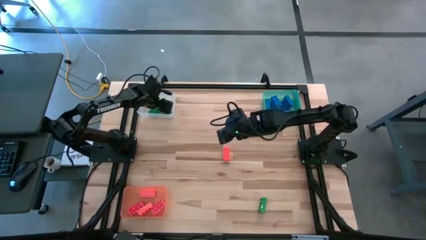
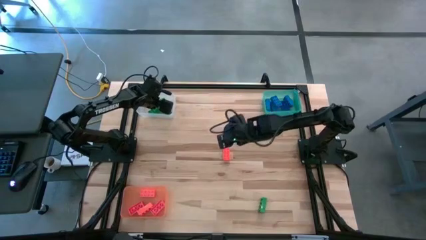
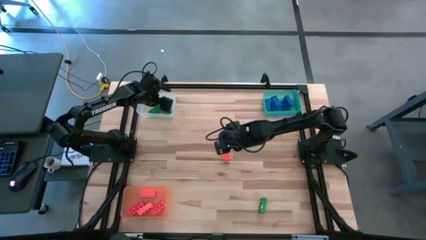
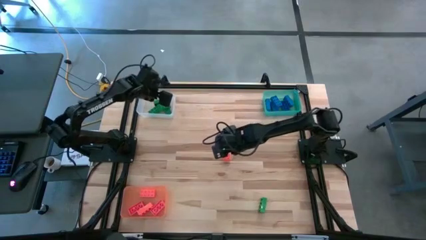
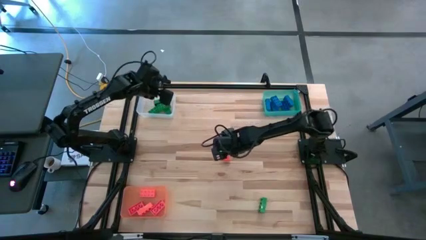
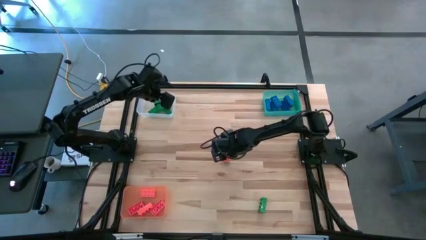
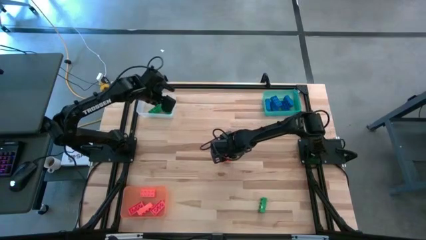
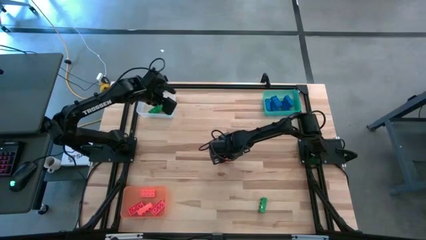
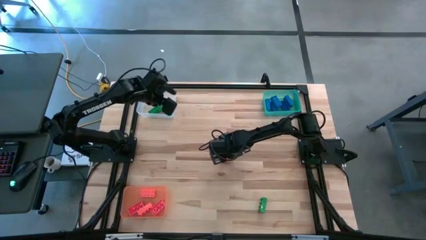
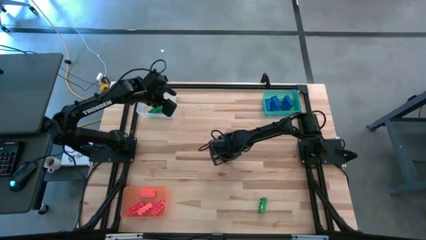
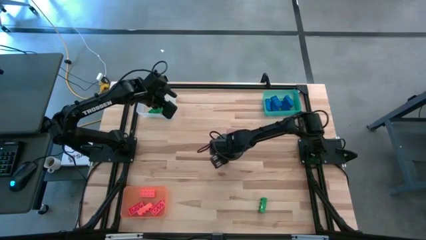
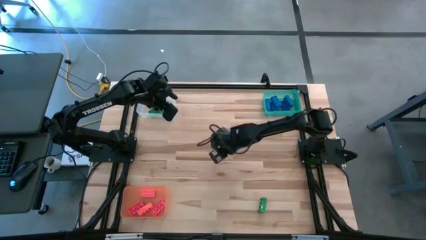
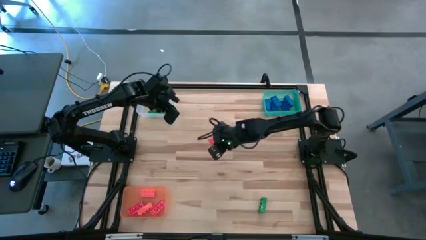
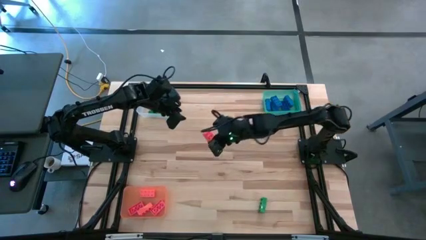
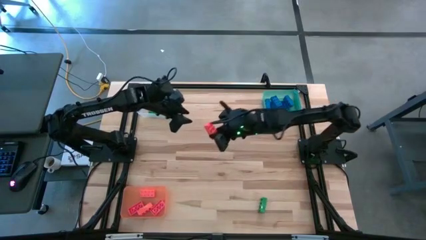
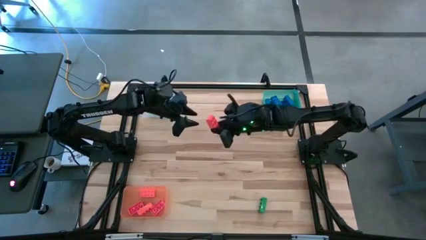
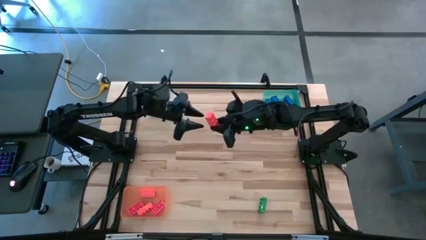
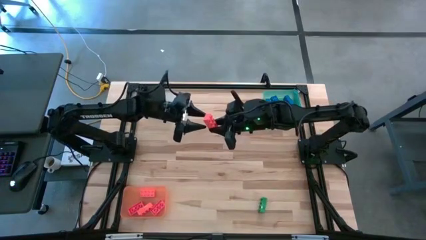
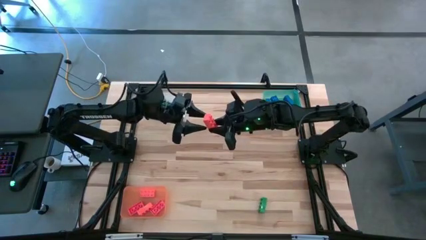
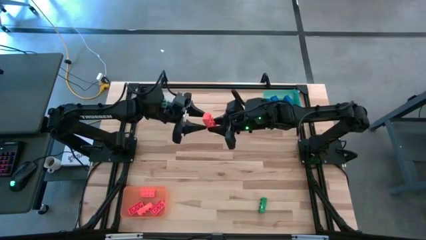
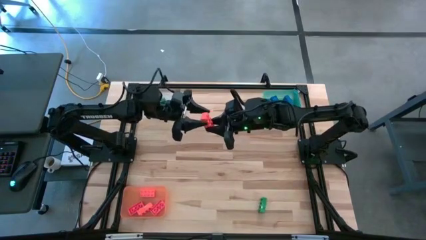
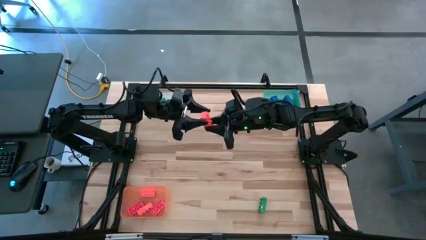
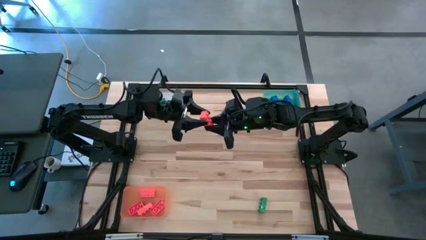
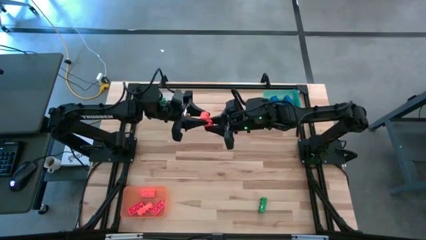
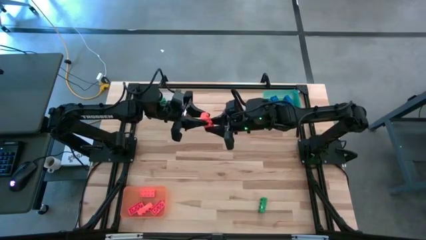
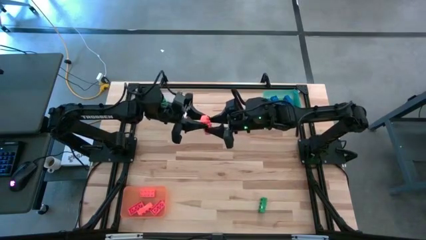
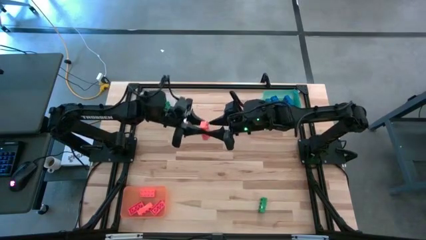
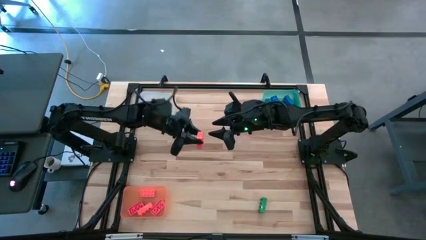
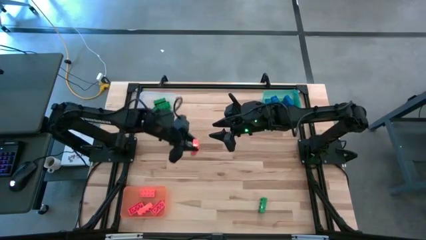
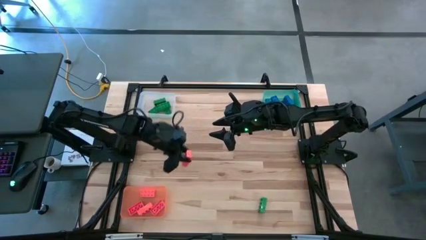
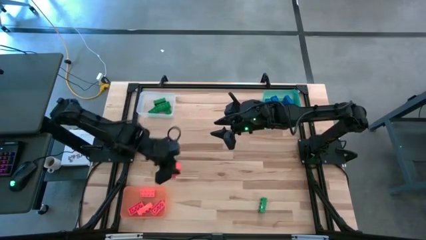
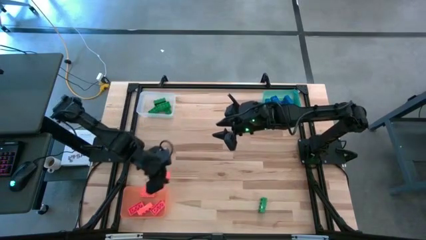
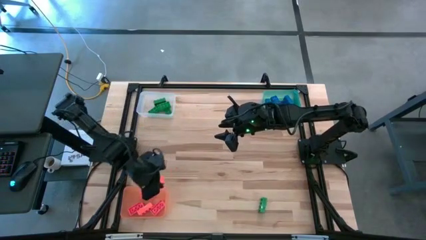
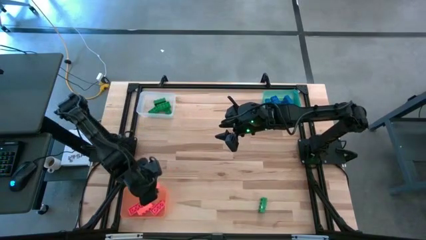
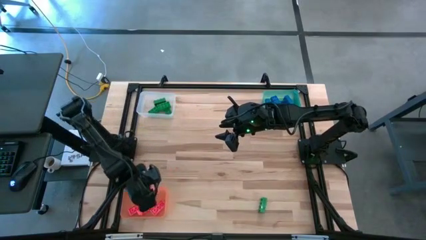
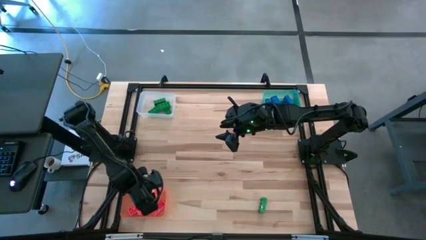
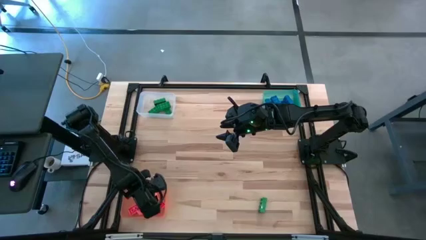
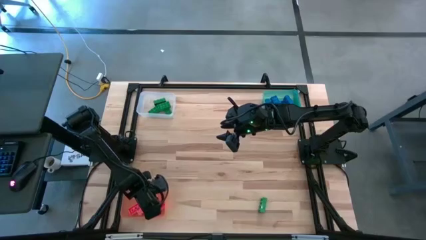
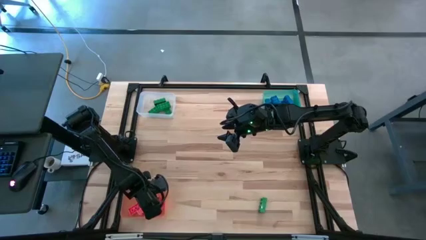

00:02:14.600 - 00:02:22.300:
Task: Sort & place blocks by color
Put the orange game piece into the orange bin

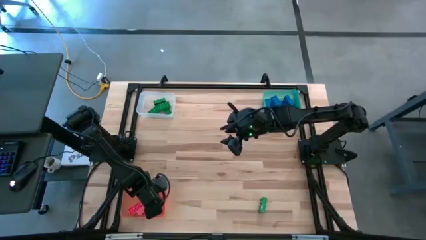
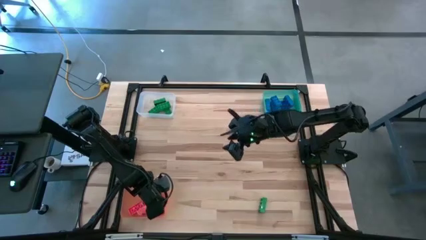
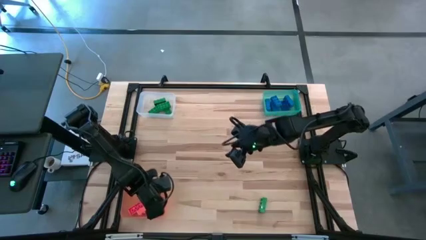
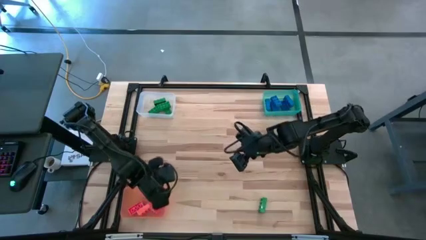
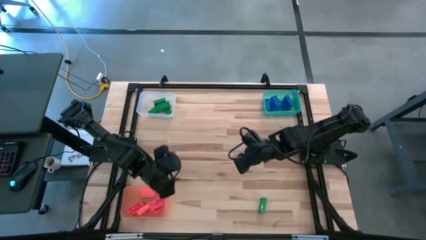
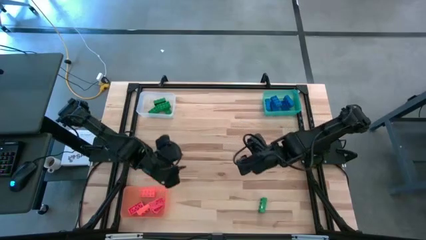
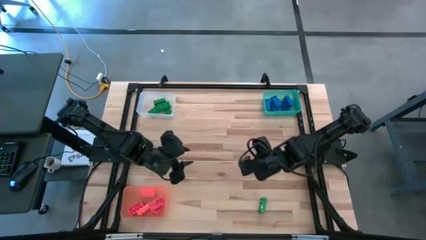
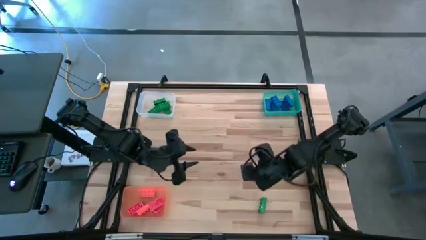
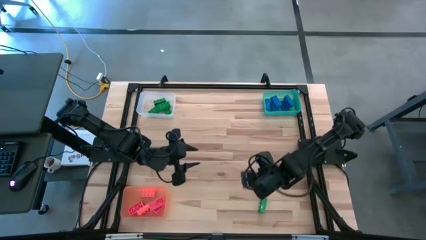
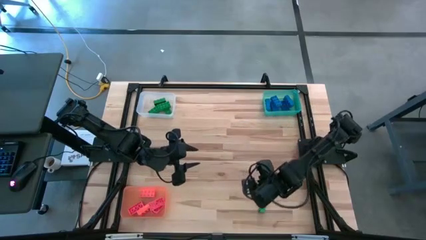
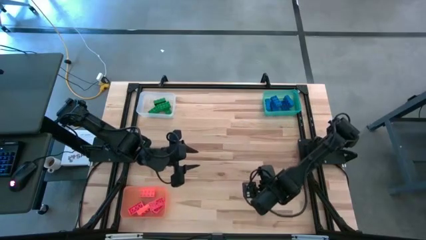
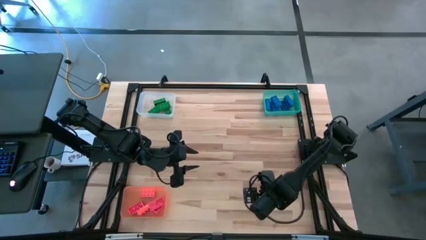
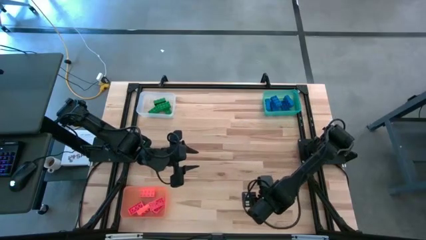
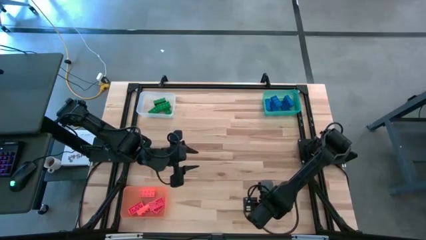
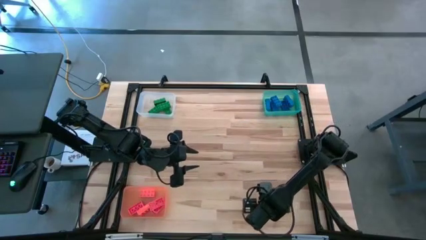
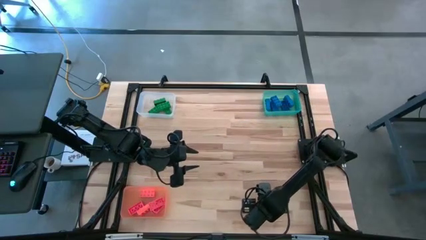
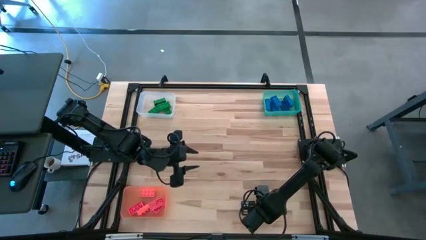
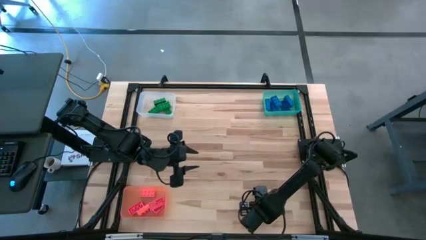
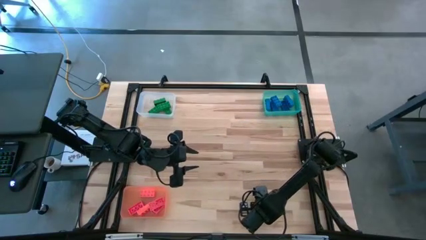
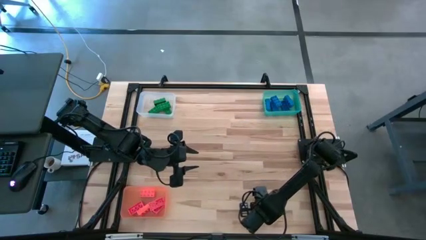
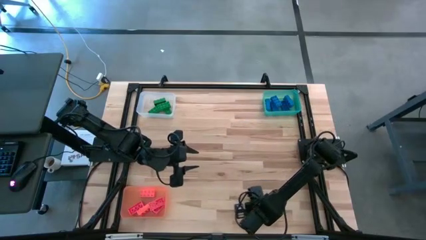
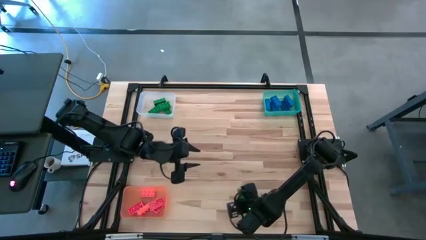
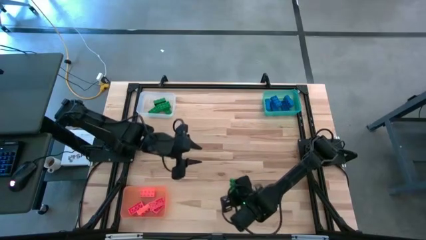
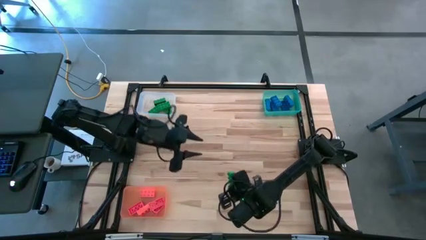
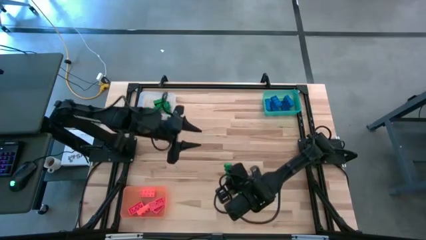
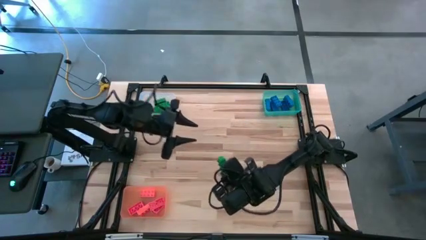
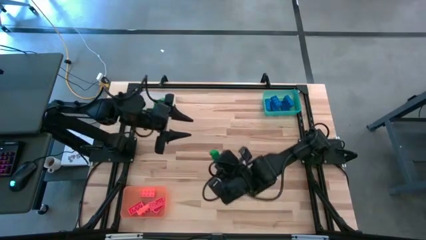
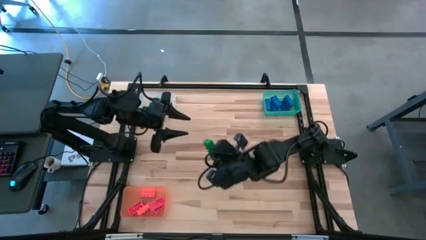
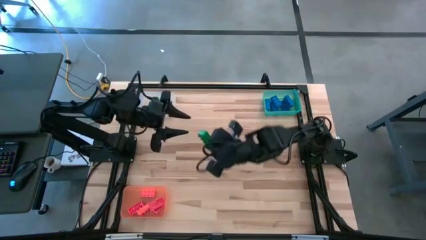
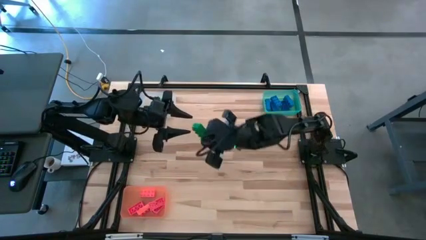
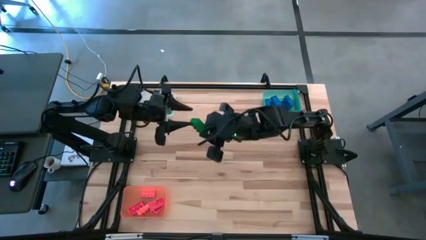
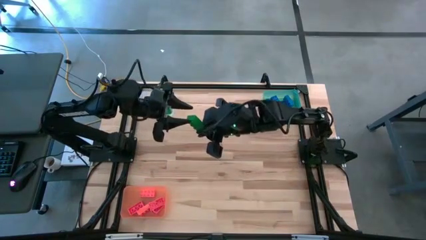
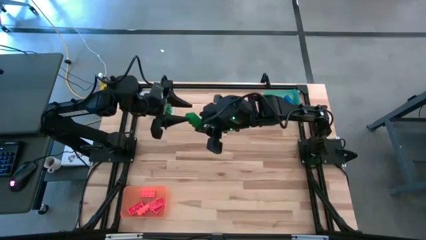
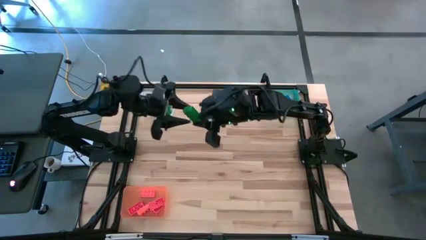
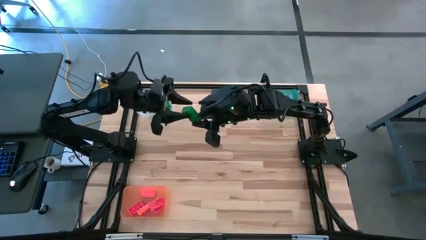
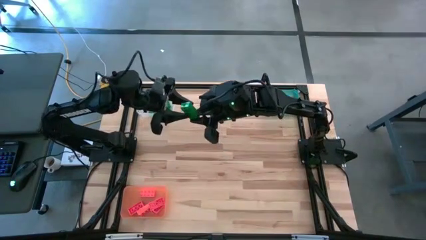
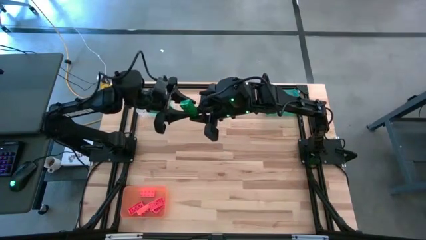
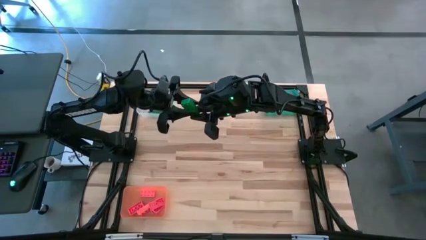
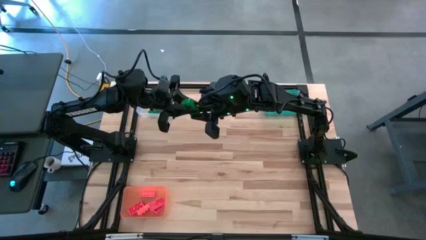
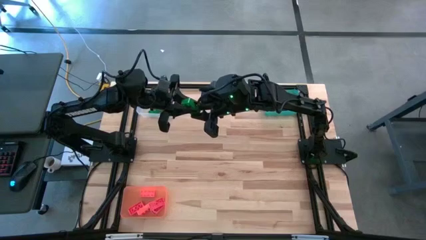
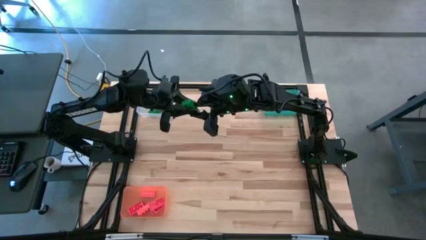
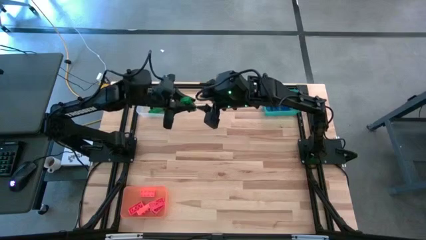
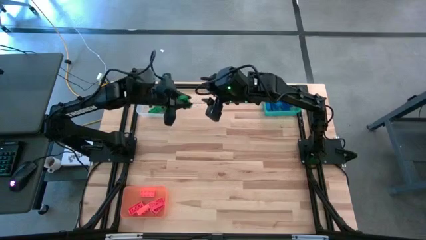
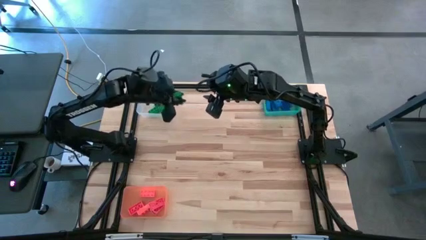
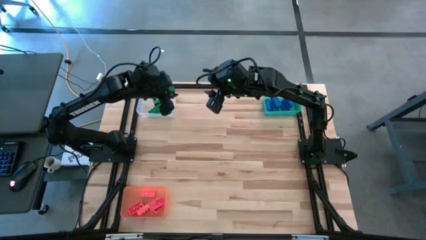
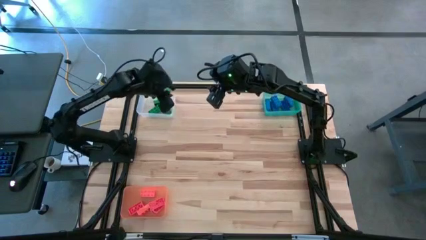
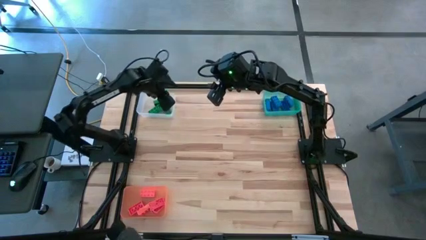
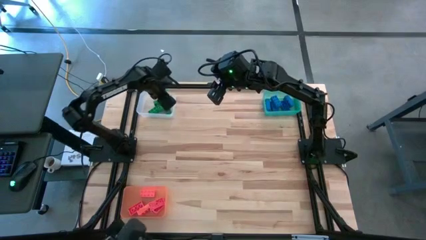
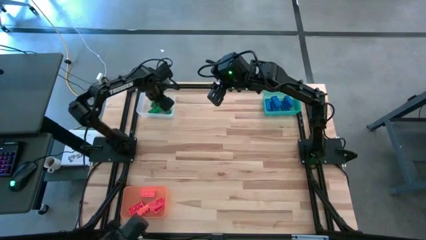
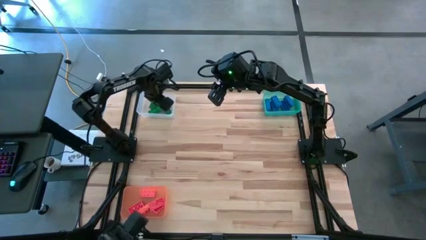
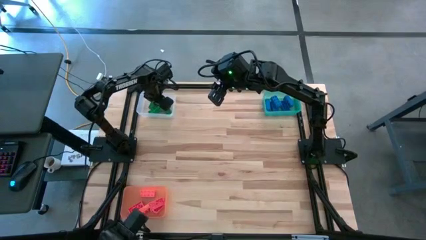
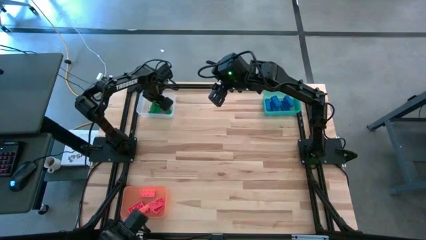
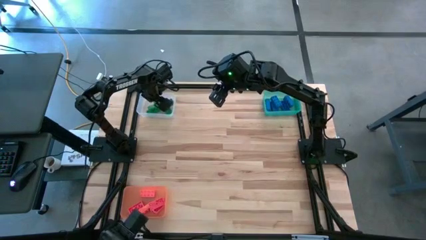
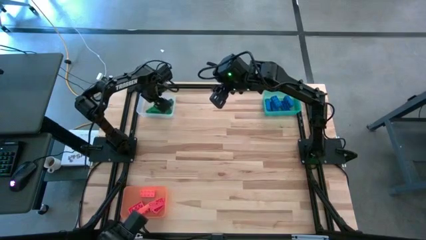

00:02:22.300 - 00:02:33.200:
Put the green game piece into the white bin
